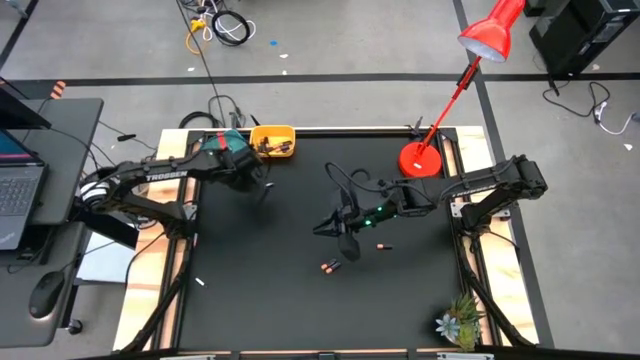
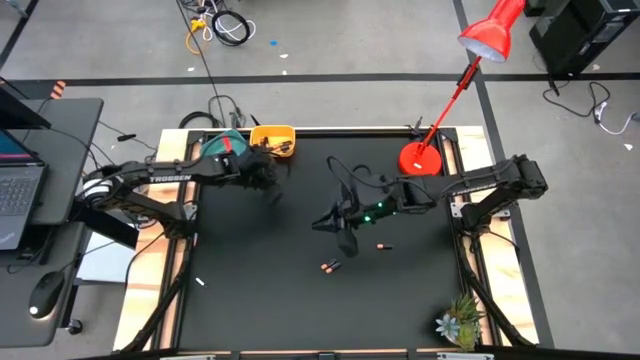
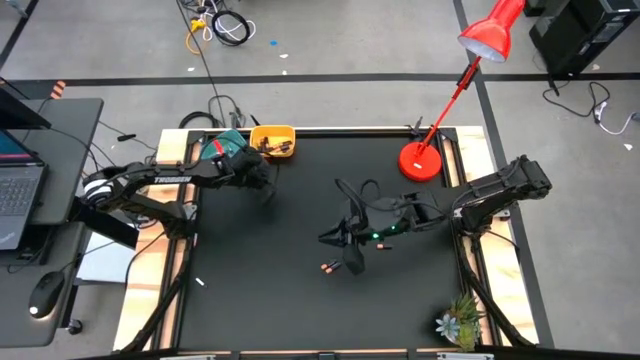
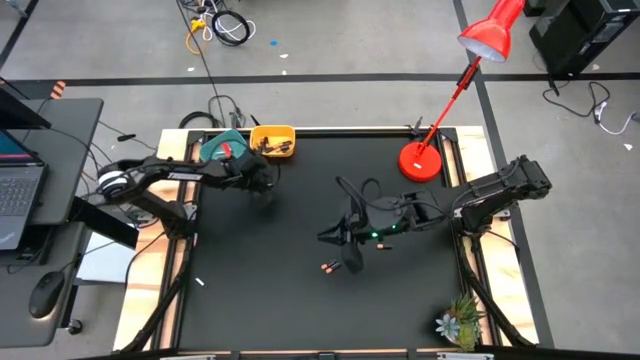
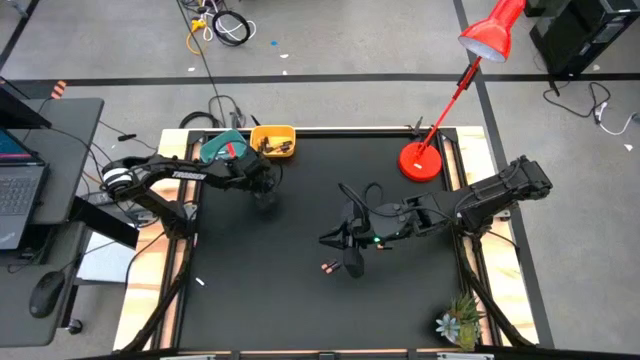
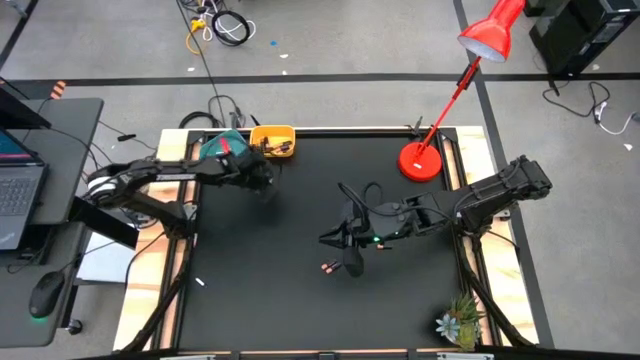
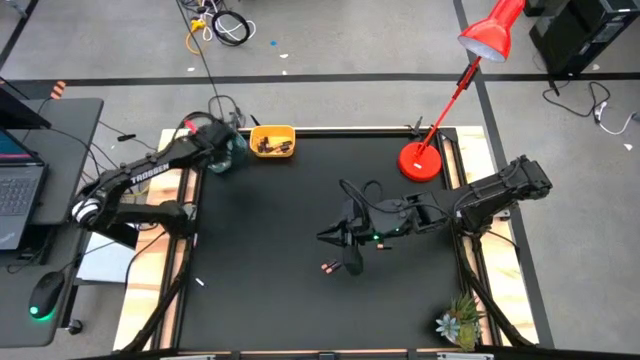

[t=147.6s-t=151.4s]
Task: Sort batteries
Put the top silver battery into the blue bin

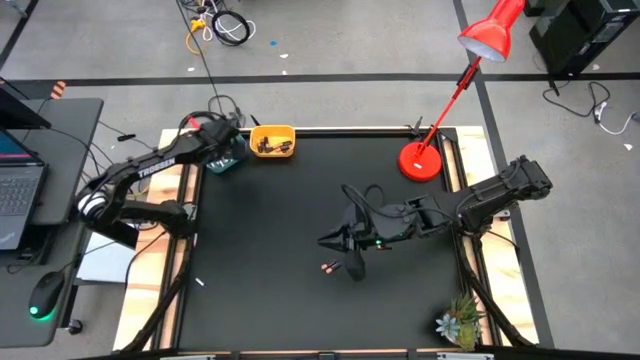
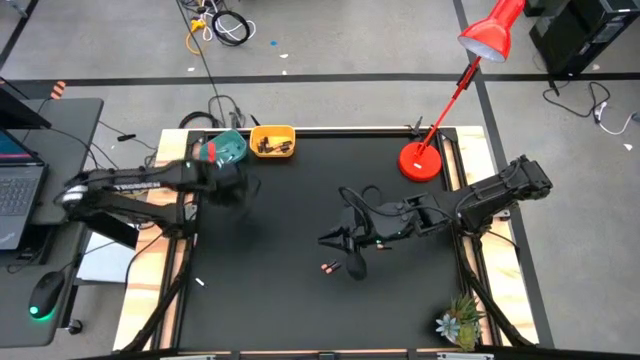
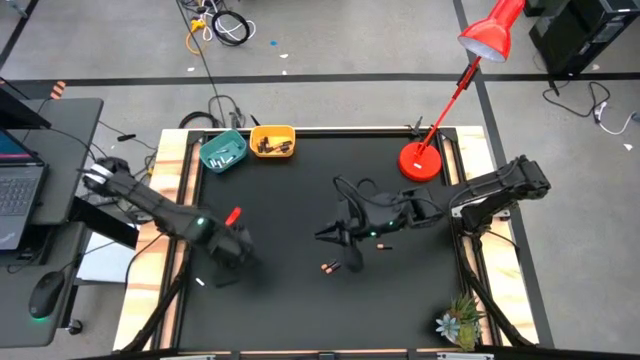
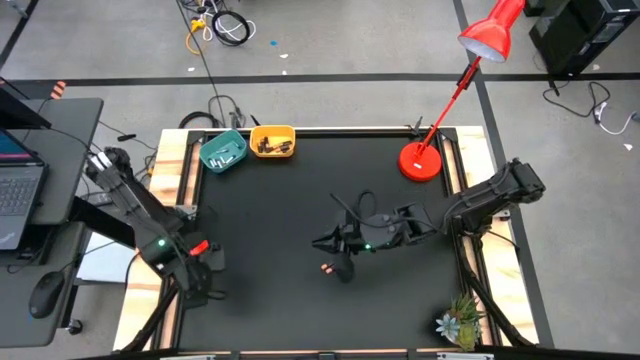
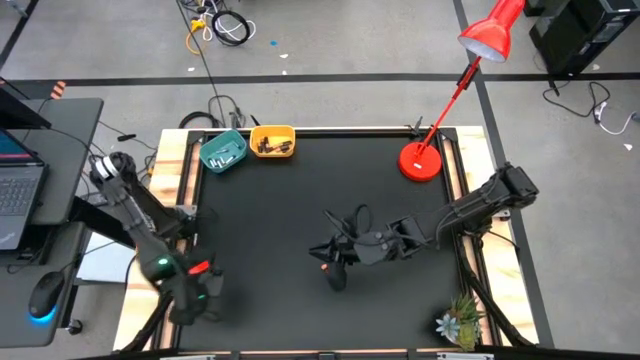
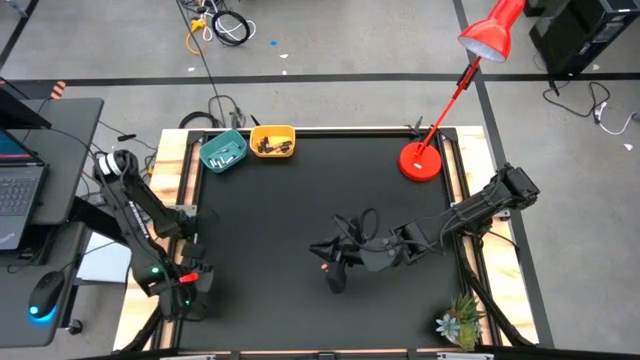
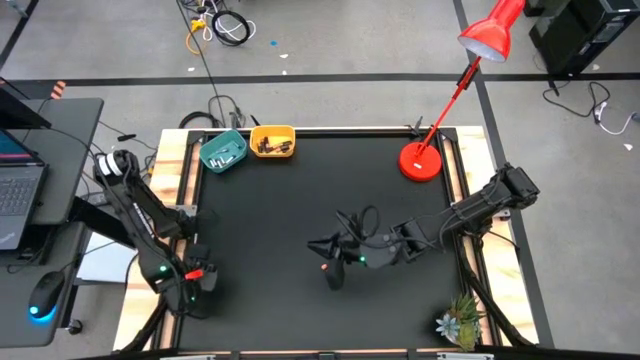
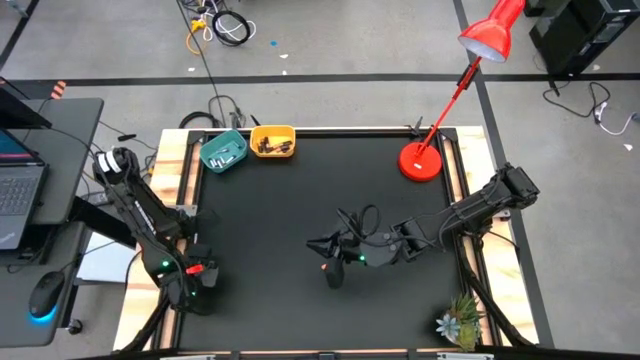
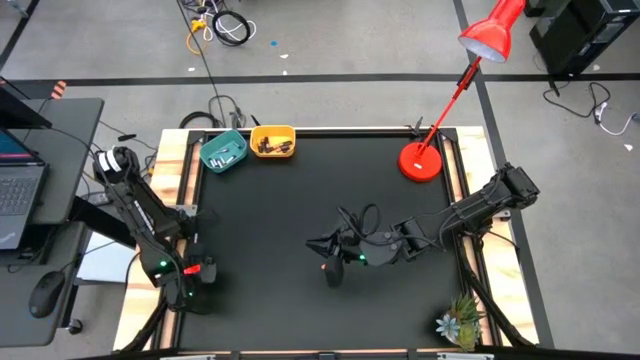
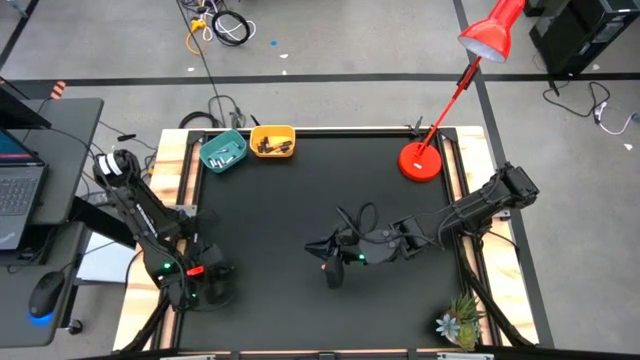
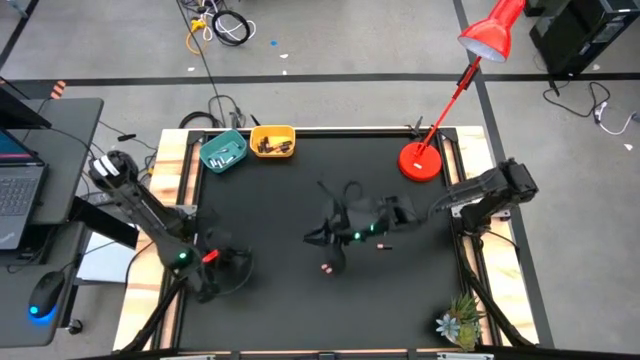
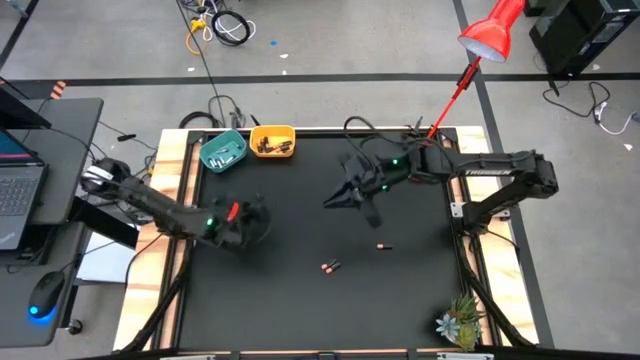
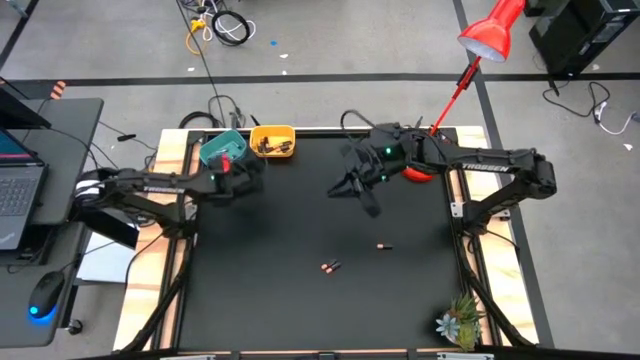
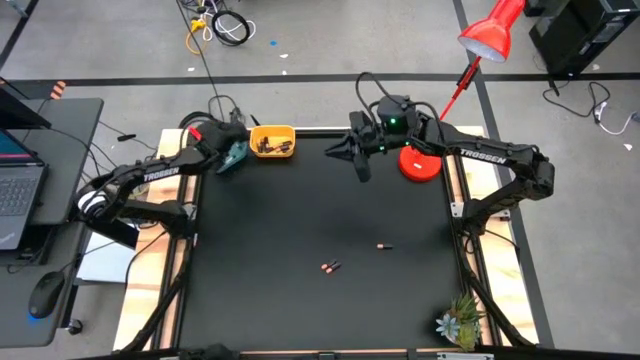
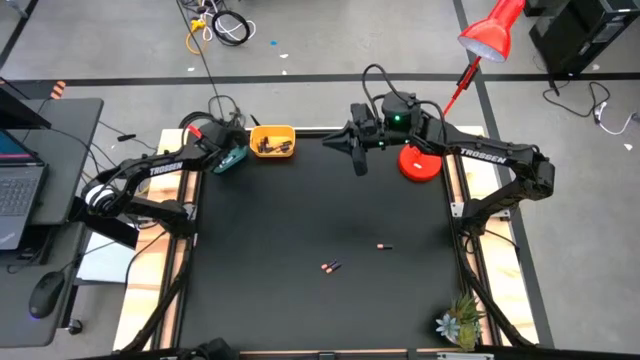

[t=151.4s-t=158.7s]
Put the bottom silver battery into the blue bin

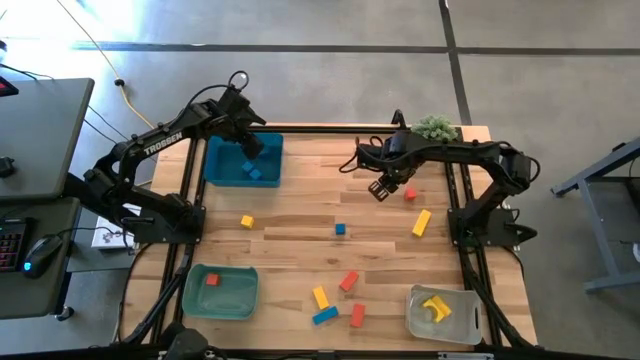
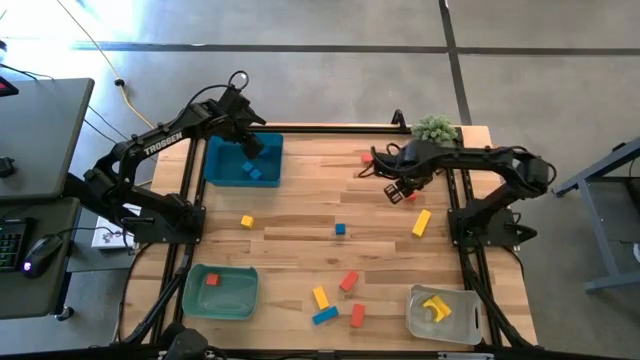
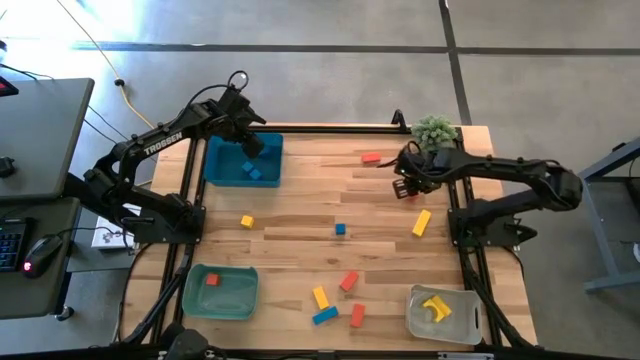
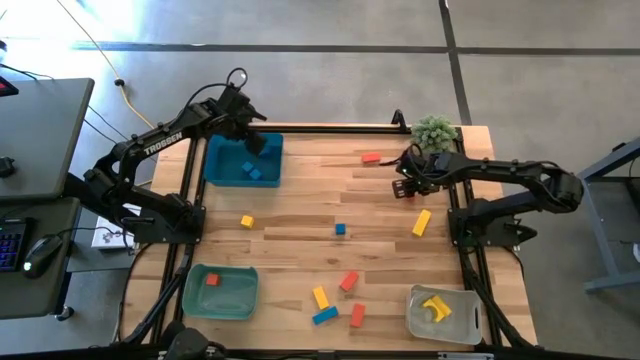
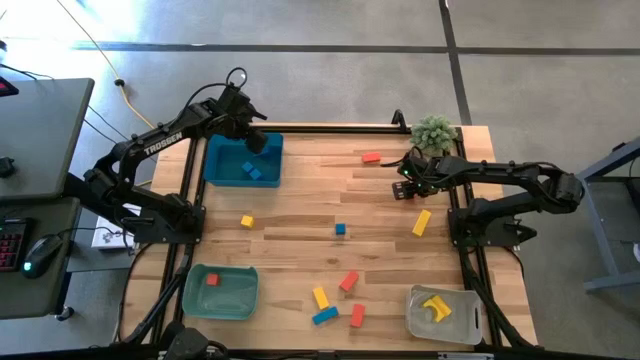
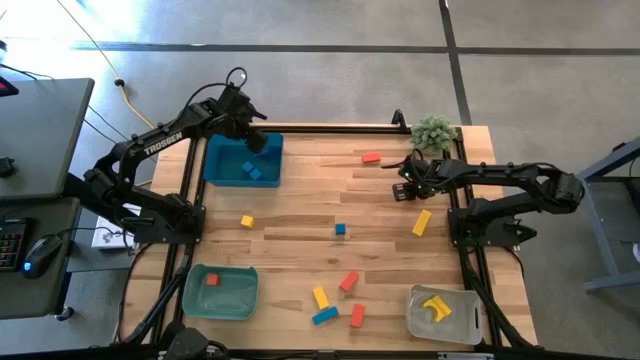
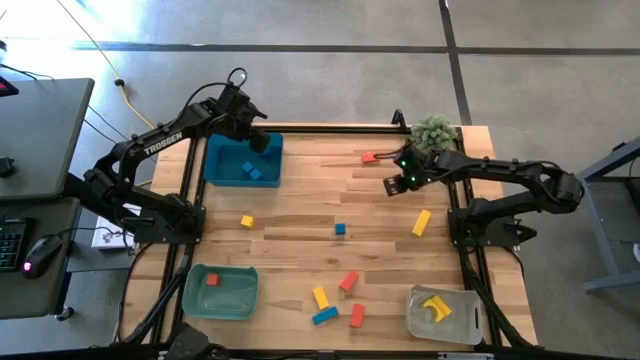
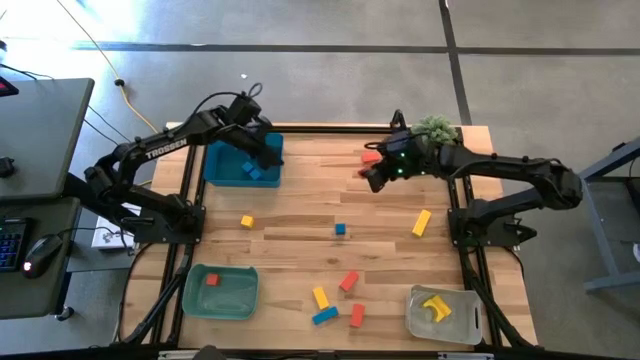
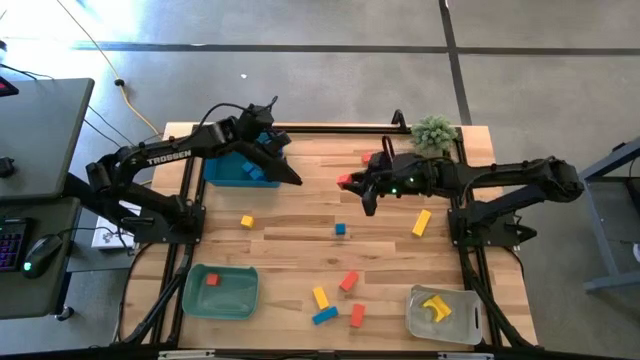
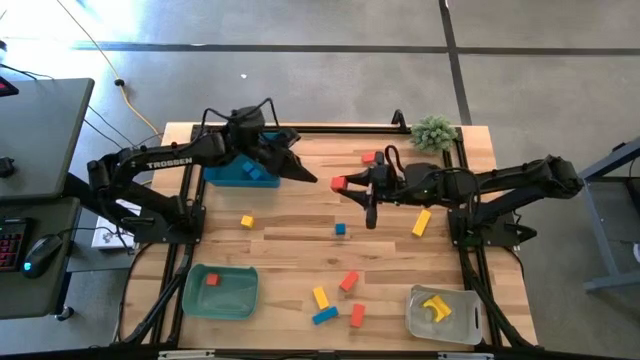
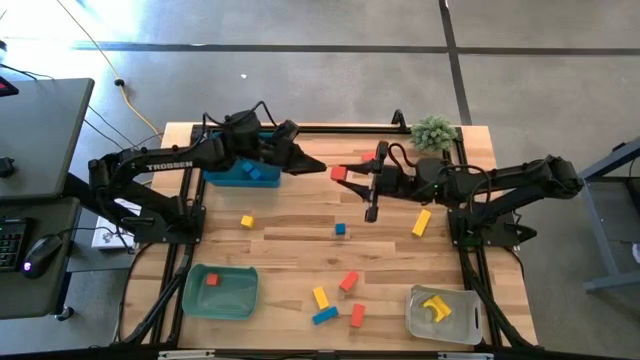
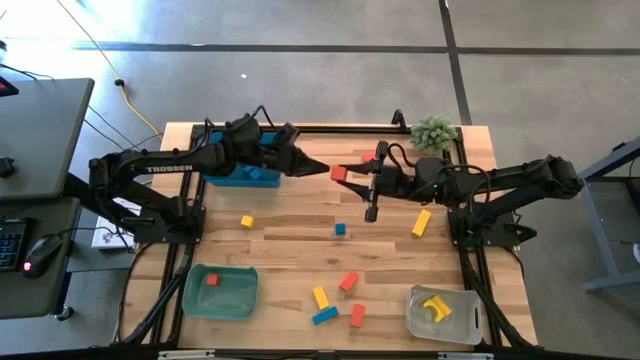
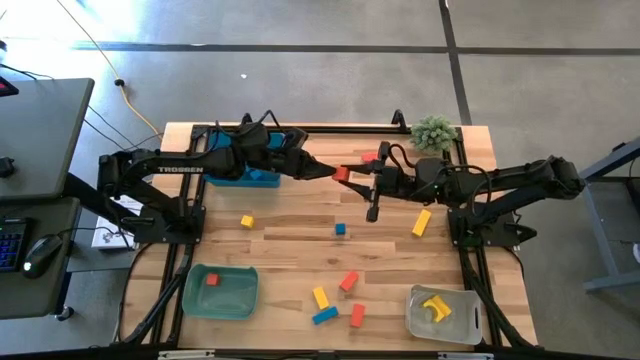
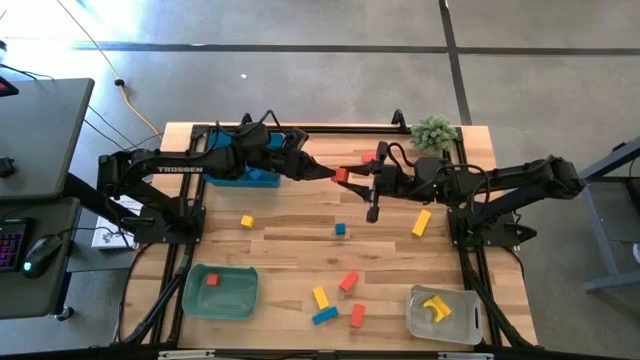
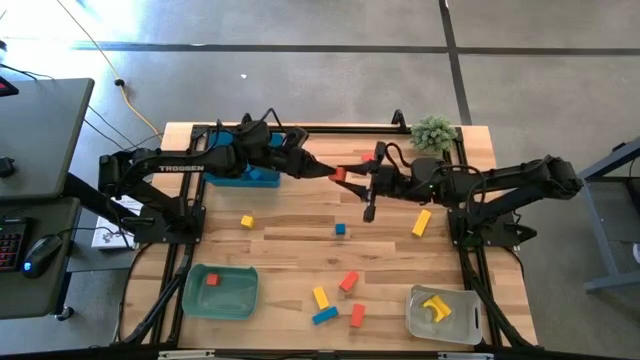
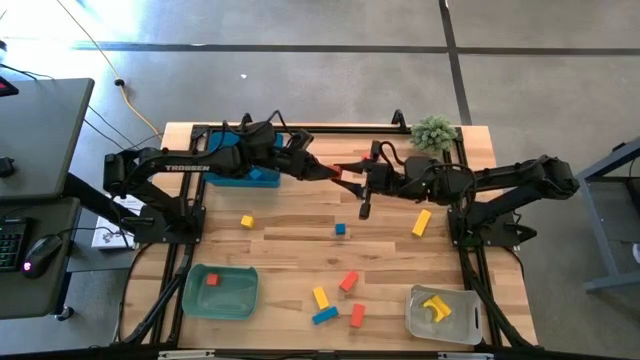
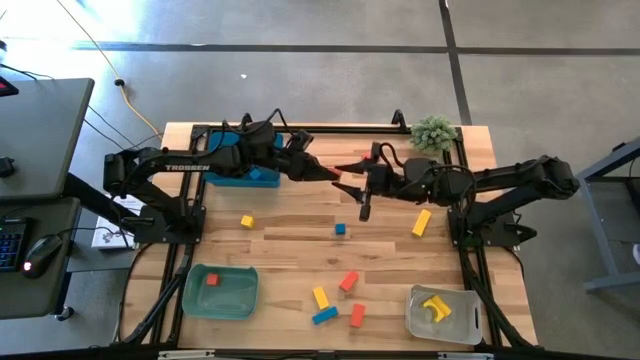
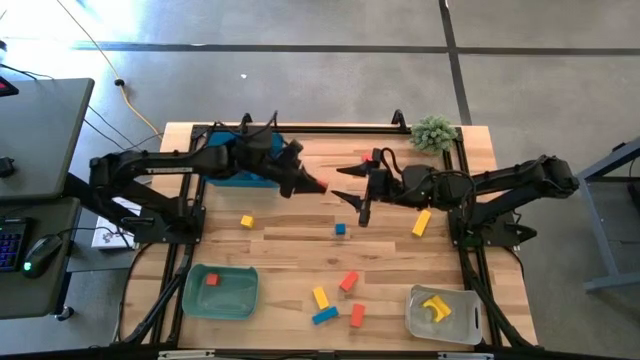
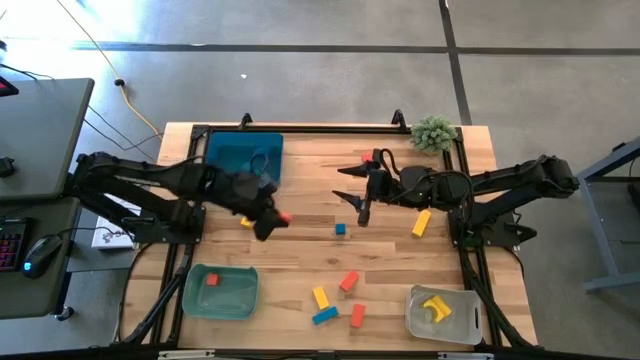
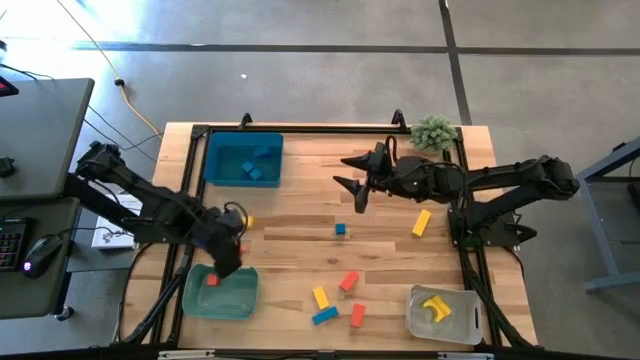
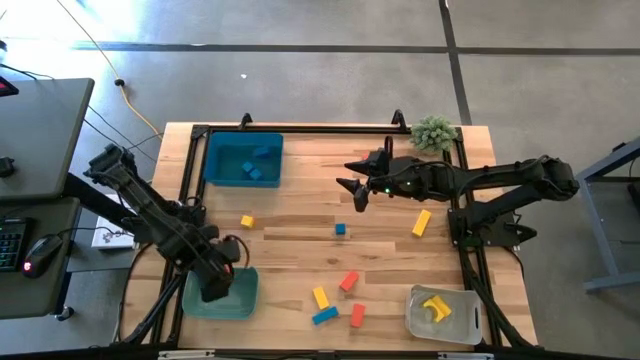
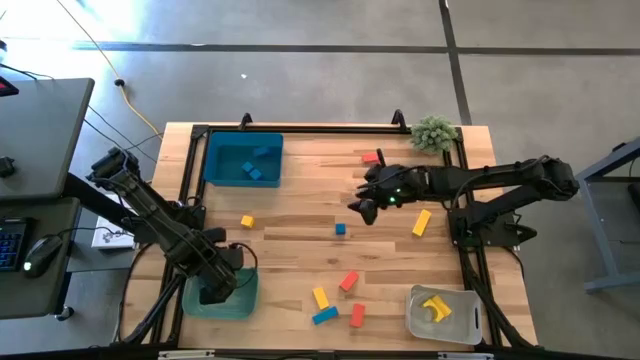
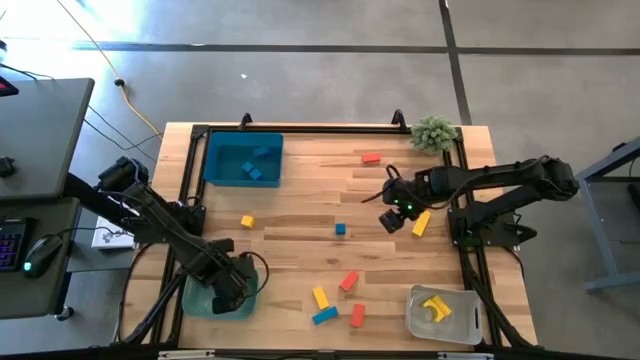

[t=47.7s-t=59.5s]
Task: Sort & place blocks by color
Put the orange block into the green bin
